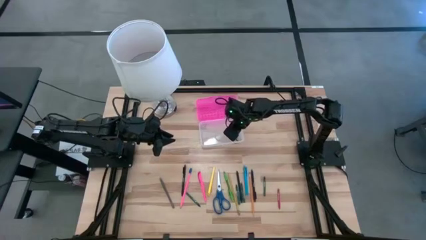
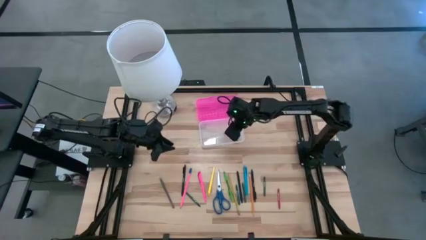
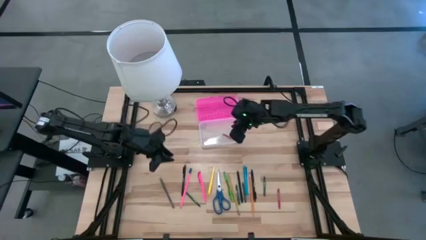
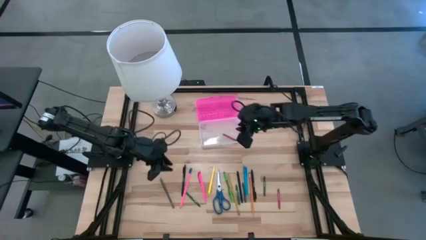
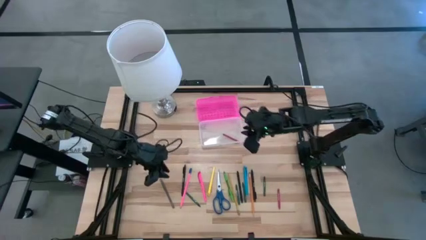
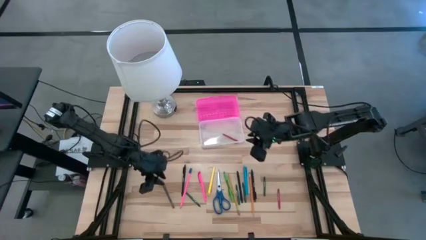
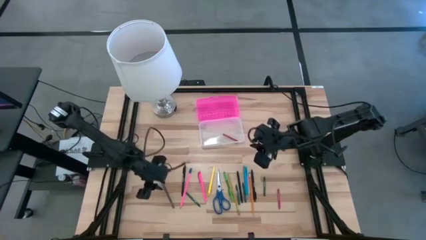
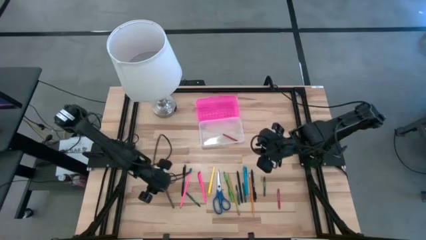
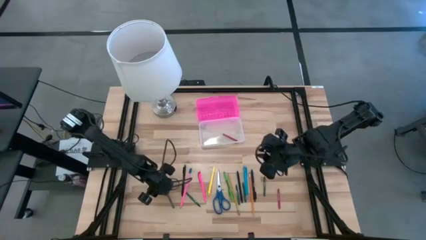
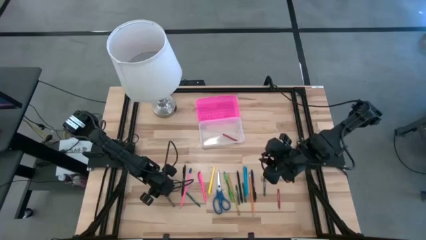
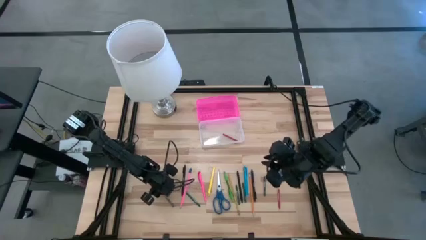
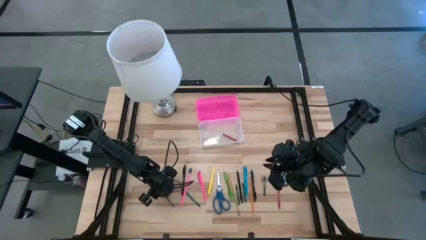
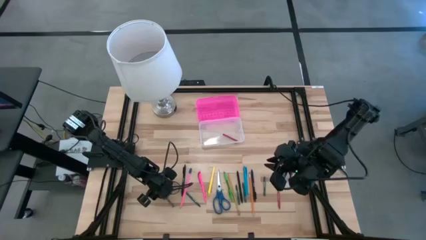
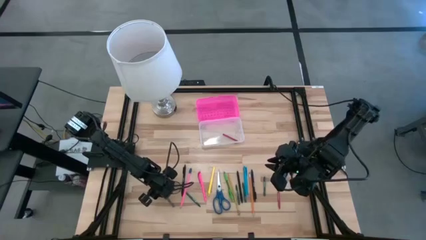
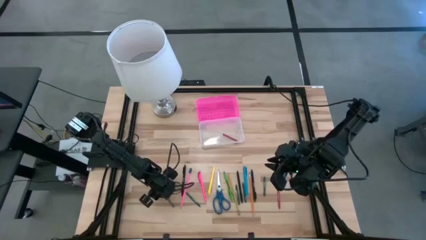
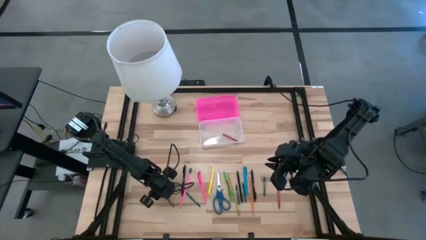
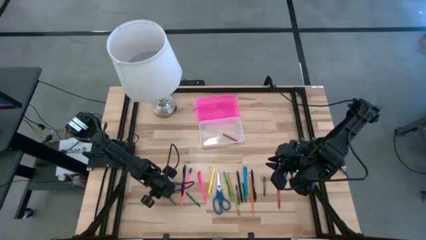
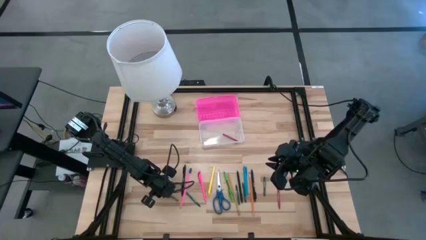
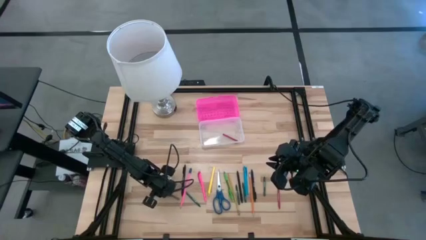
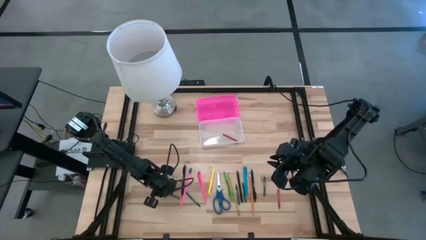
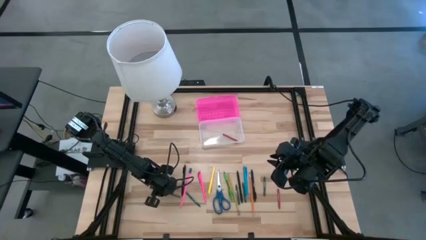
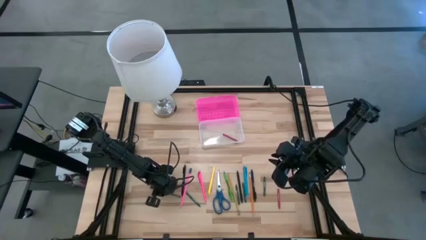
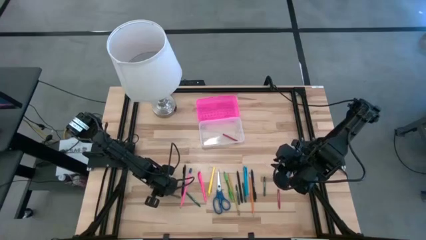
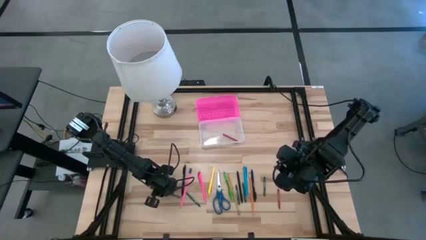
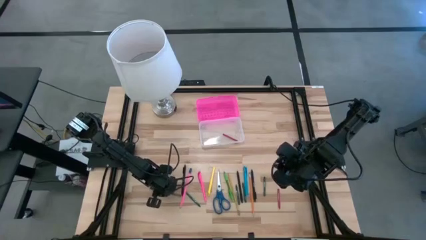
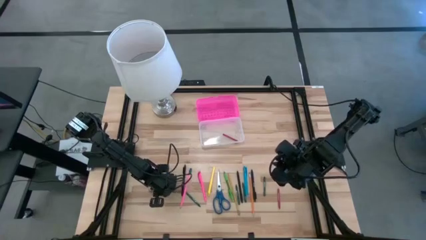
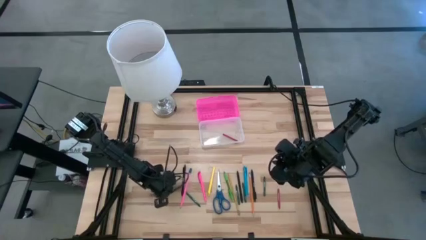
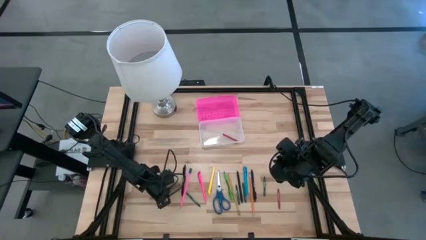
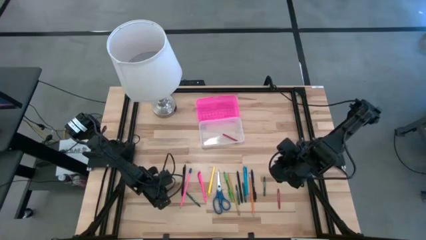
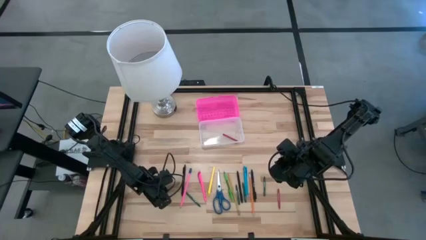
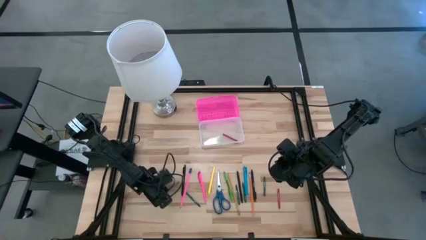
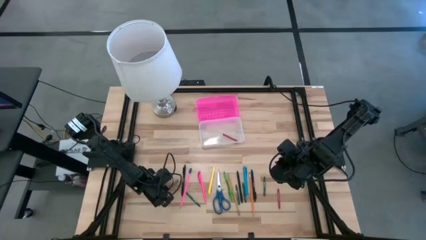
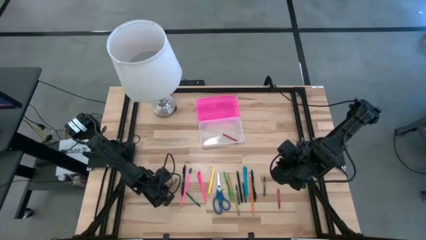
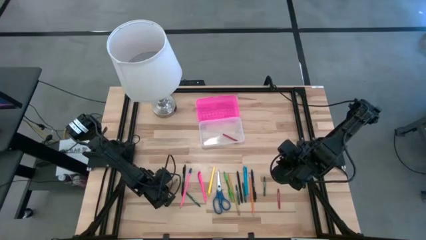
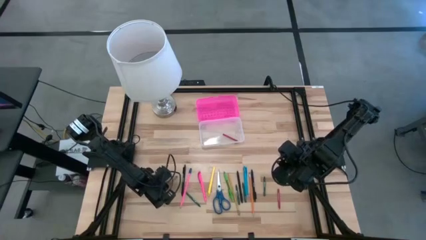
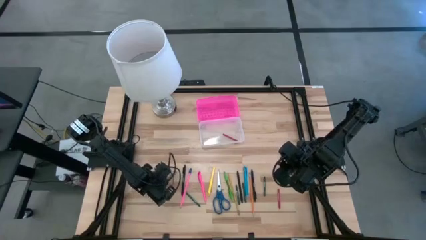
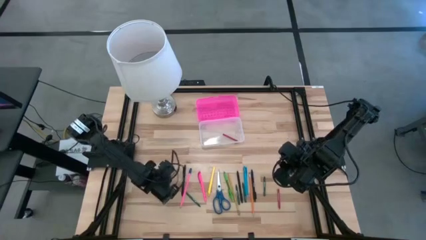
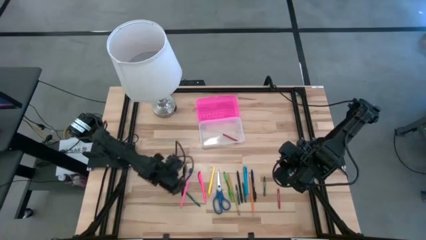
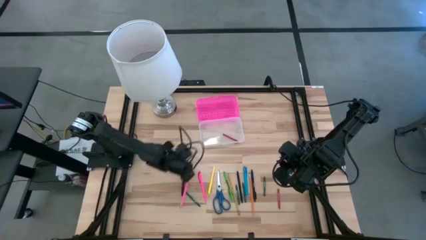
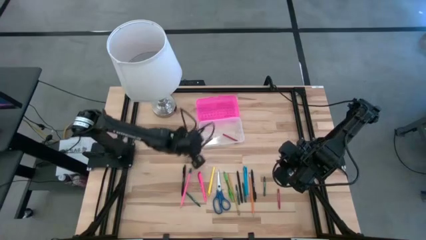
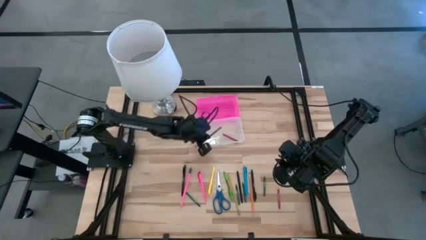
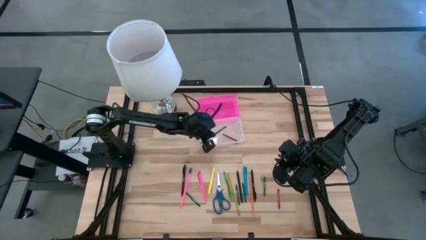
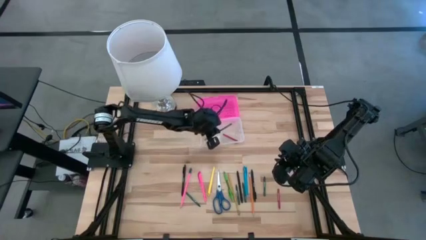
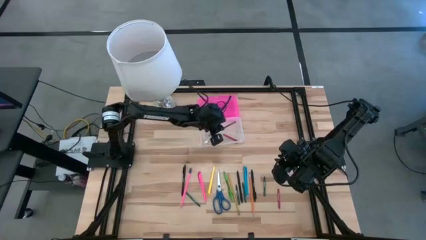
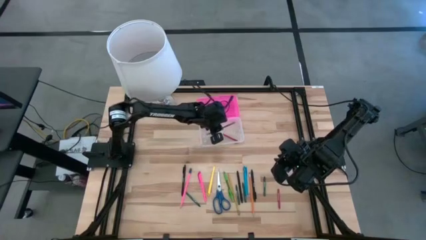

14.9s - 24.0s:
Task: Pick & place school supplies into a supply box
Put the gray pen into the pink supply box

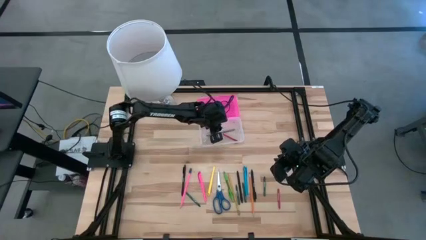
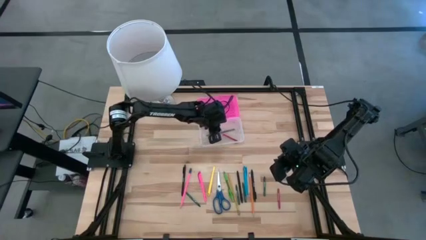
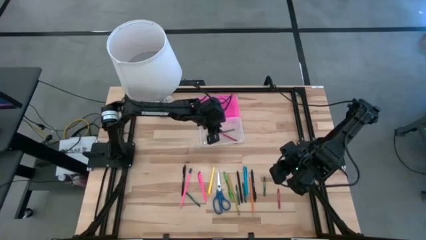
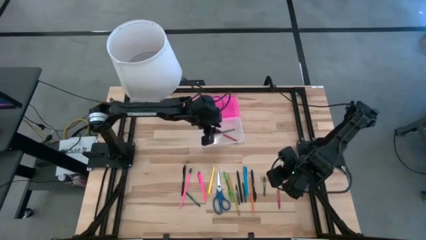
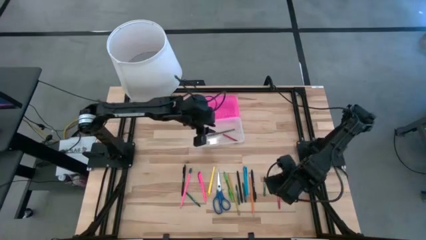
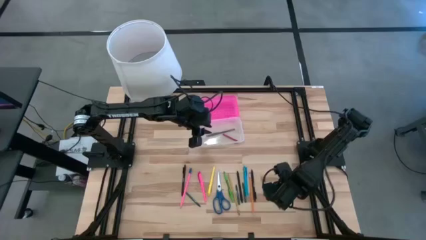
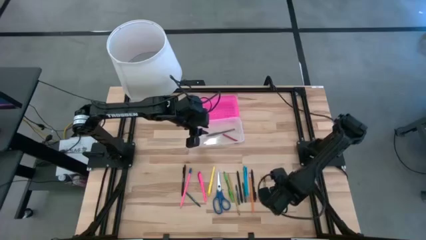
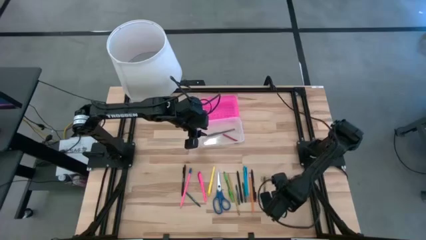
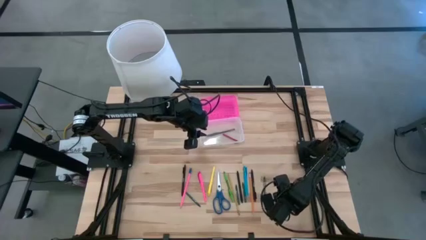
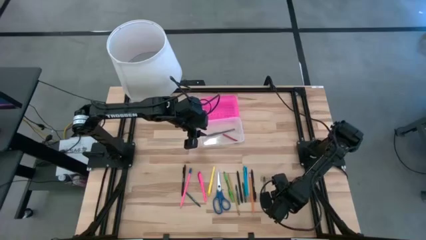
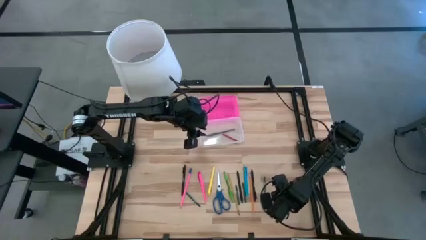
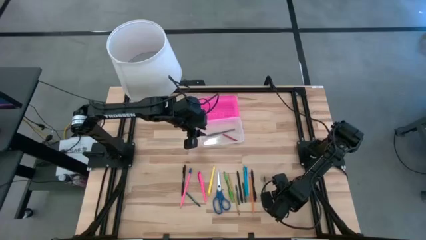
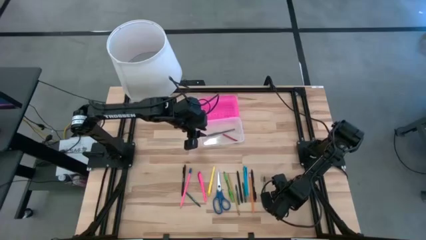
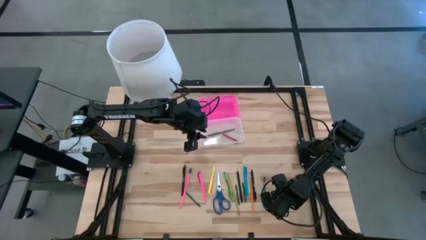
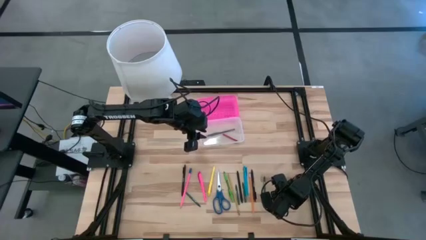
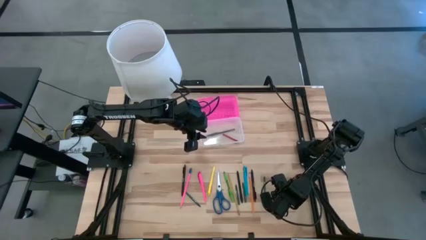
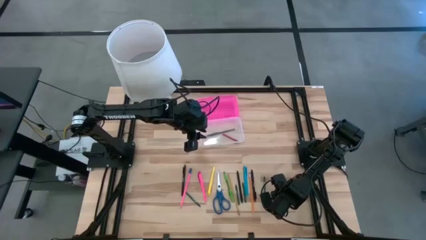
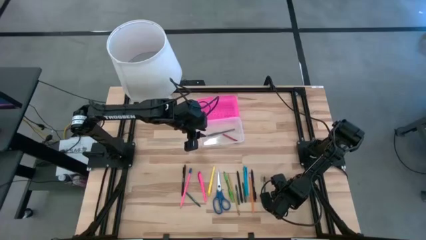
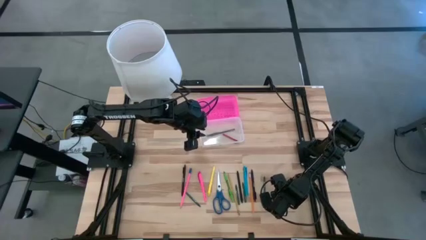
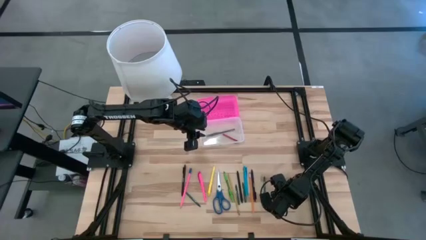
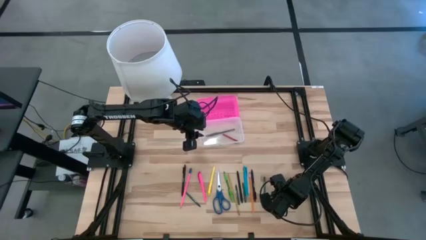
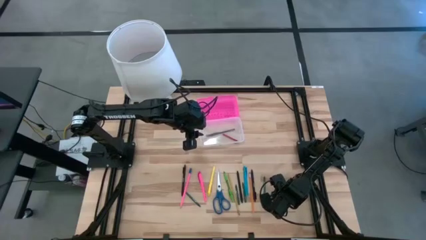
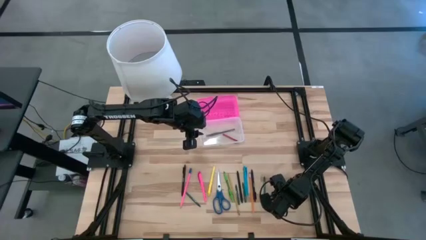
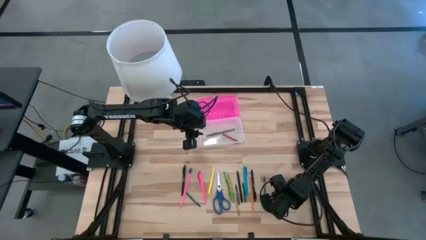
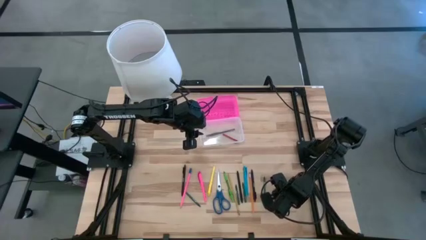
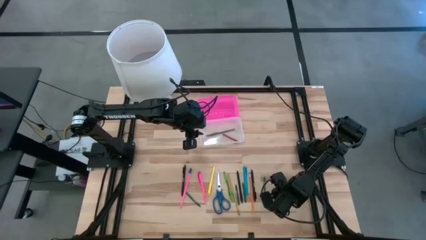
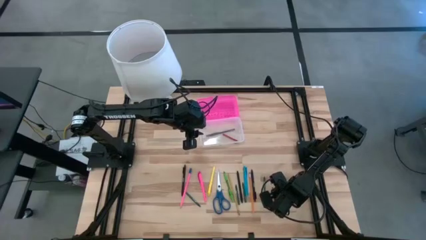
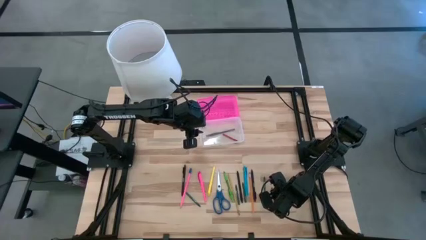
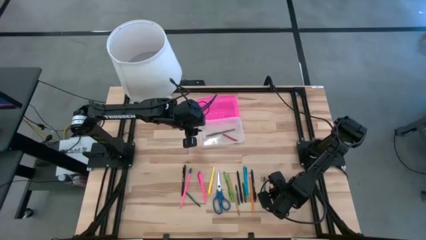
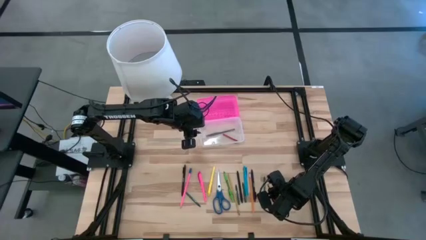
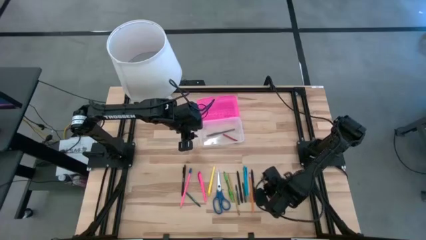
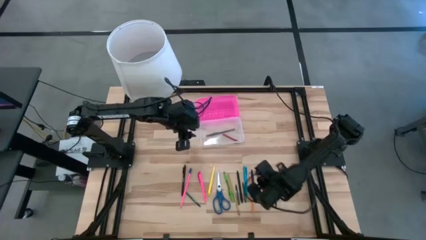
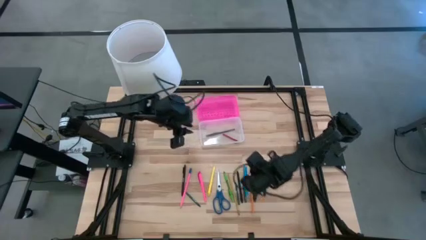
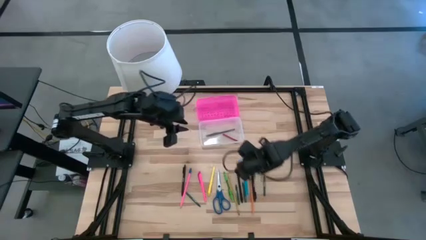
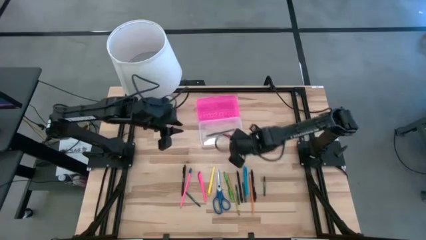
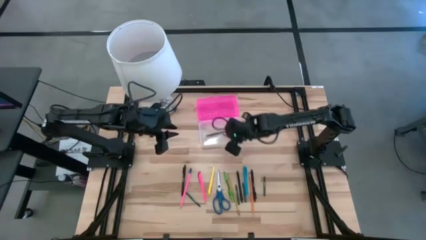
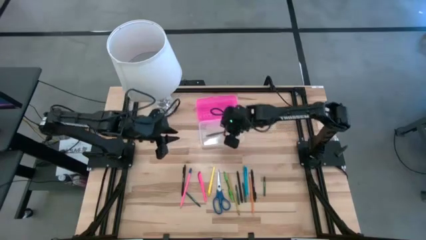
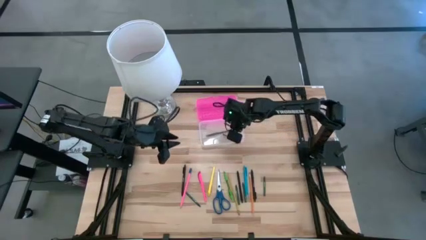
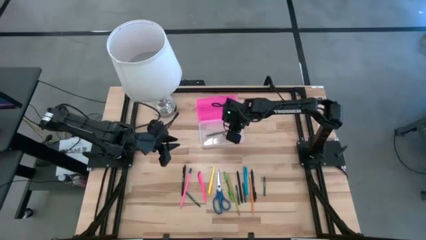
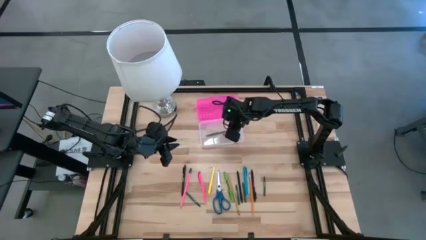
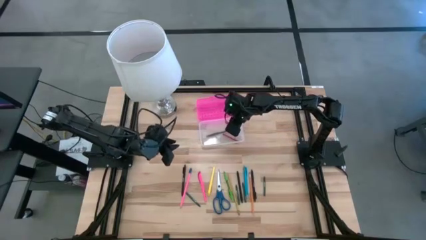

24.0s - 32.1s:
Put the red crayon into the pink supply box
